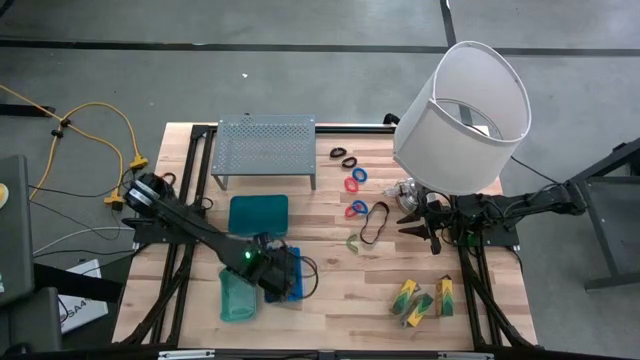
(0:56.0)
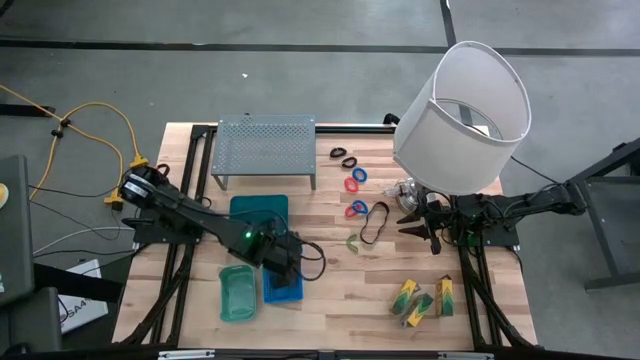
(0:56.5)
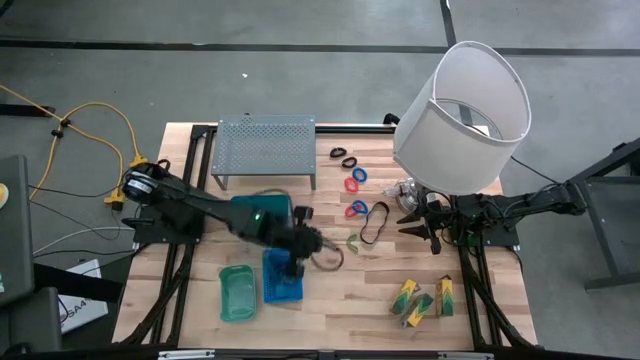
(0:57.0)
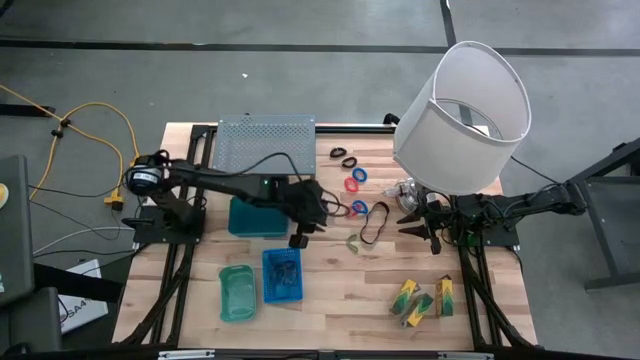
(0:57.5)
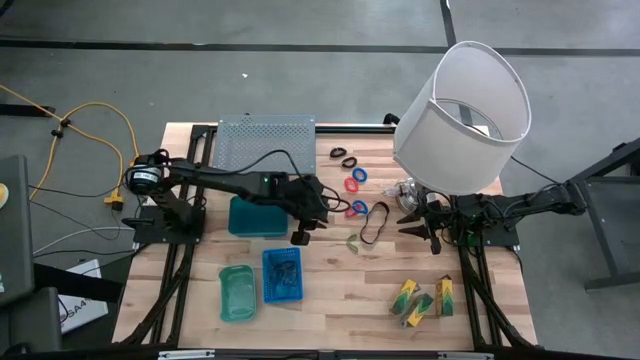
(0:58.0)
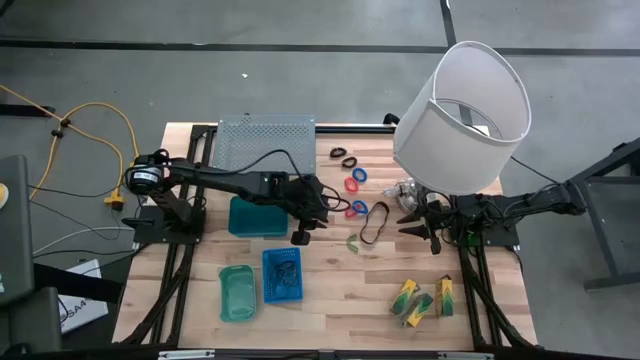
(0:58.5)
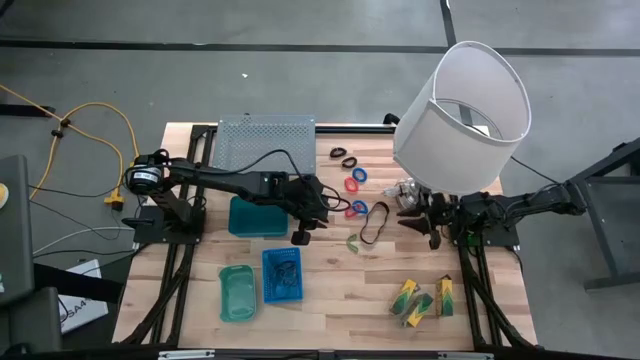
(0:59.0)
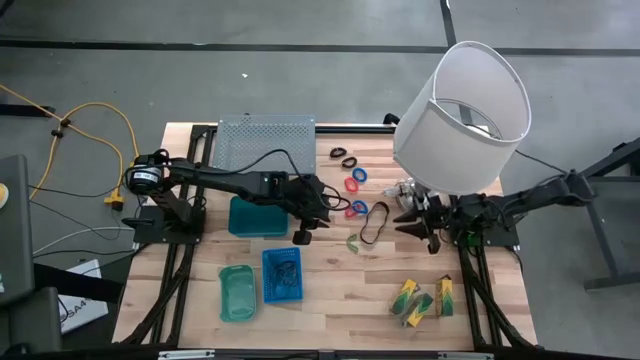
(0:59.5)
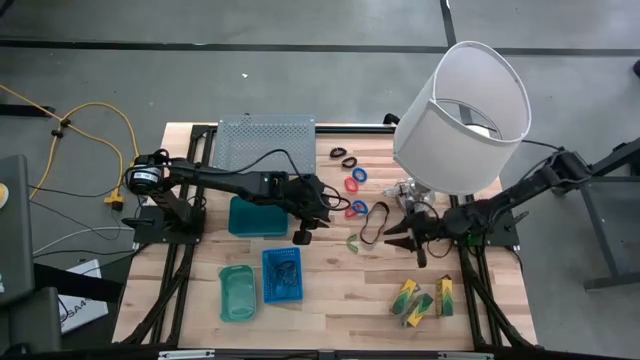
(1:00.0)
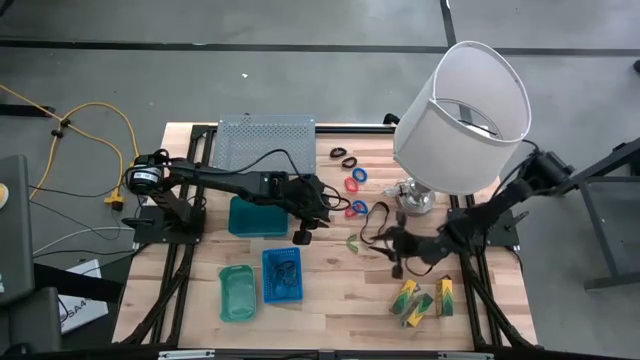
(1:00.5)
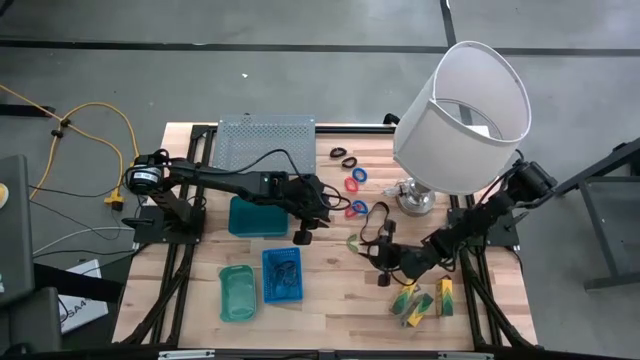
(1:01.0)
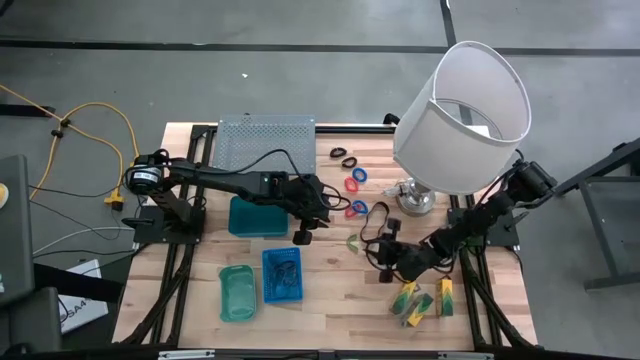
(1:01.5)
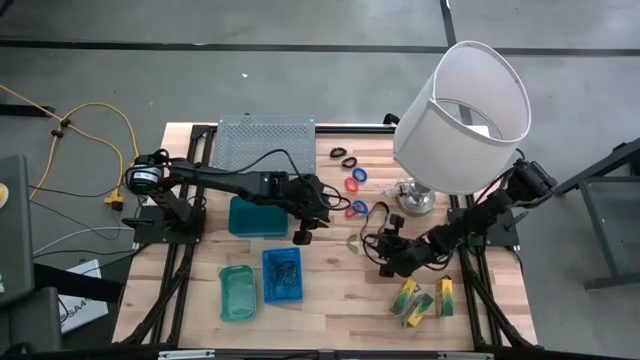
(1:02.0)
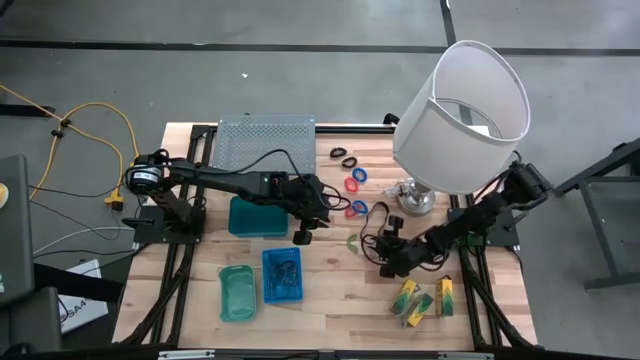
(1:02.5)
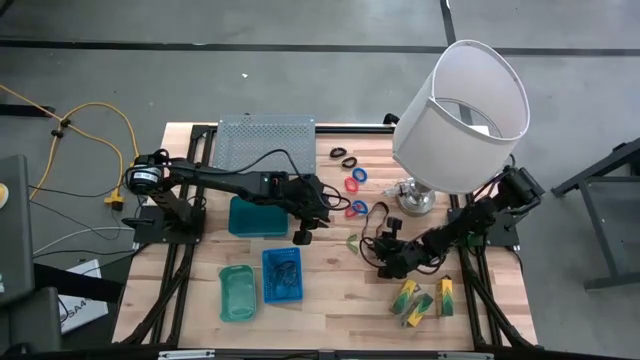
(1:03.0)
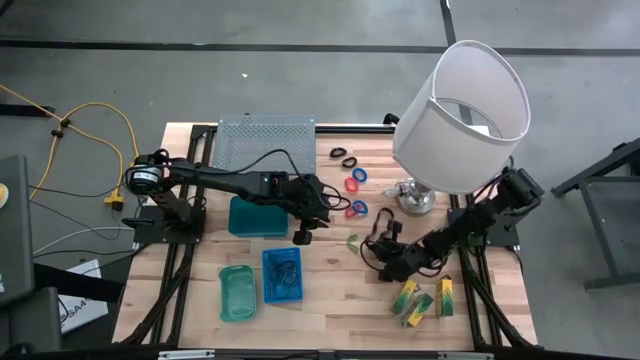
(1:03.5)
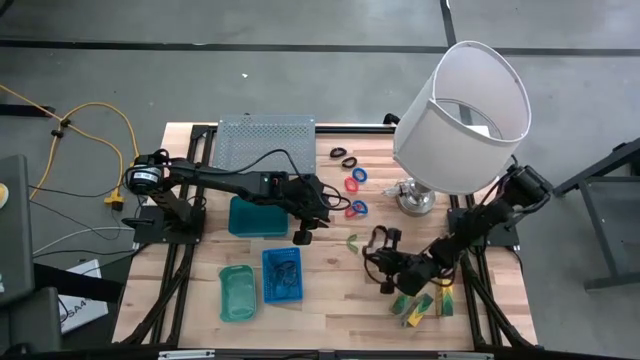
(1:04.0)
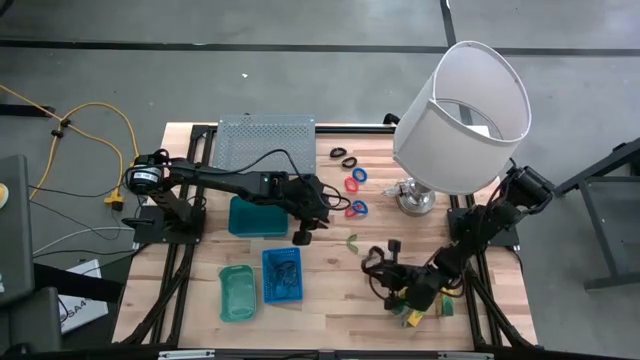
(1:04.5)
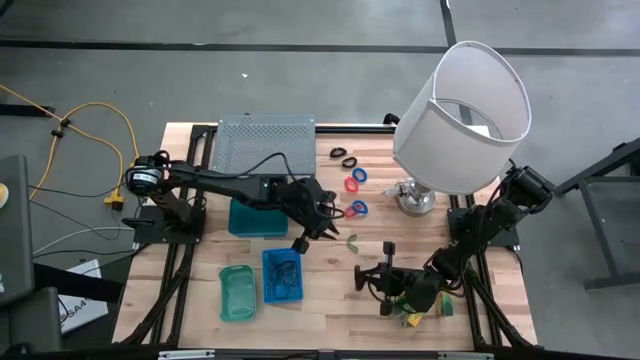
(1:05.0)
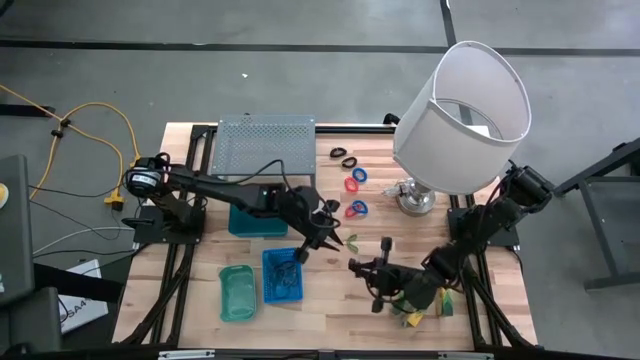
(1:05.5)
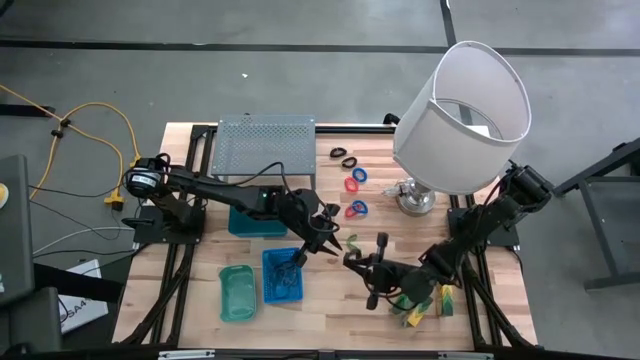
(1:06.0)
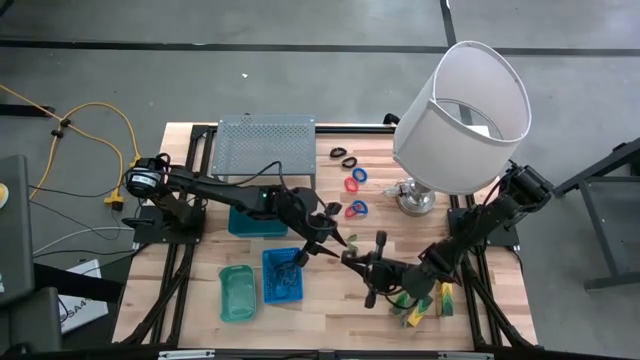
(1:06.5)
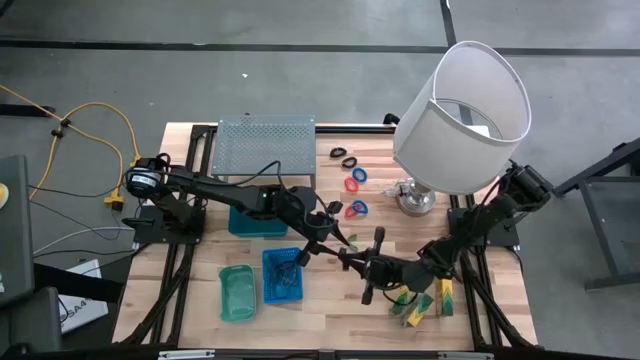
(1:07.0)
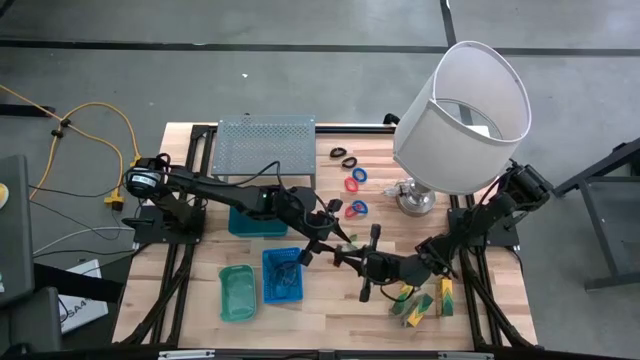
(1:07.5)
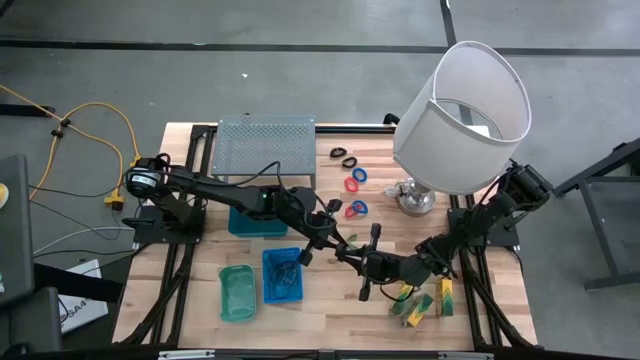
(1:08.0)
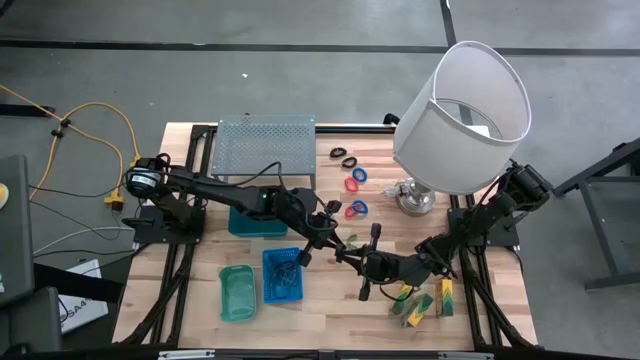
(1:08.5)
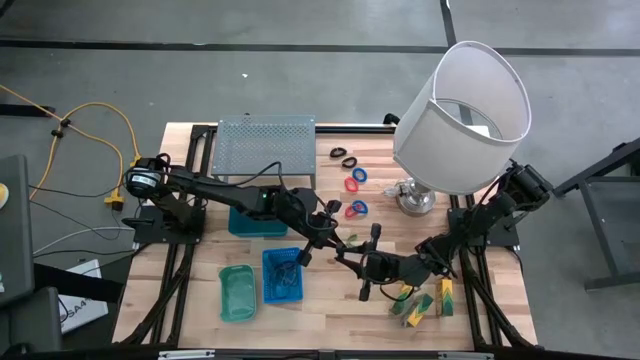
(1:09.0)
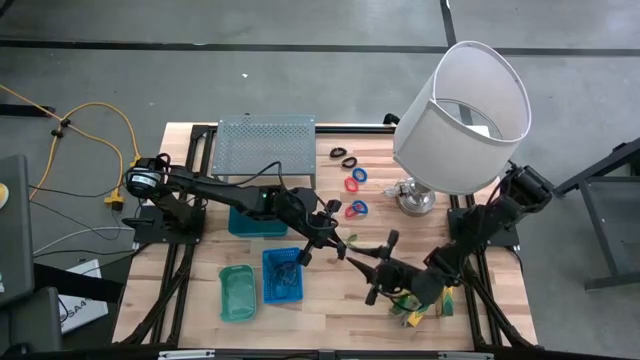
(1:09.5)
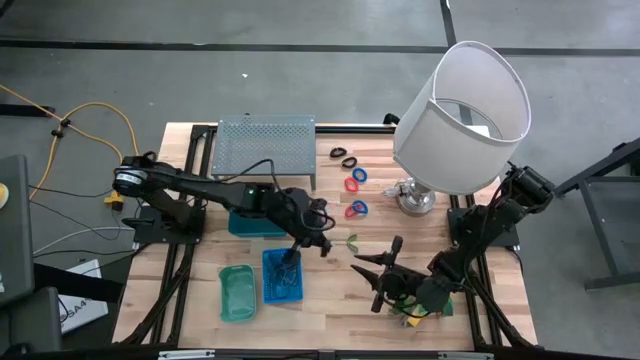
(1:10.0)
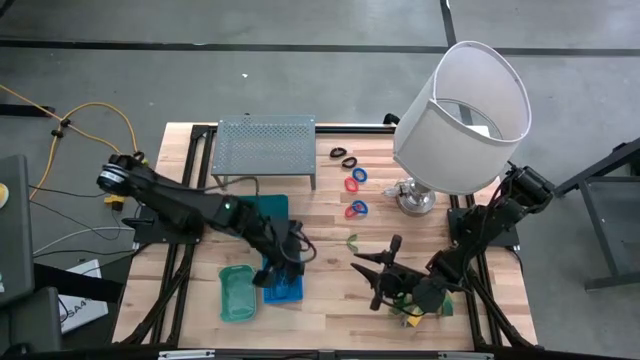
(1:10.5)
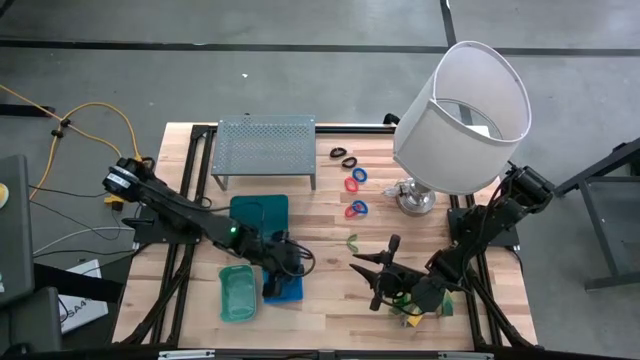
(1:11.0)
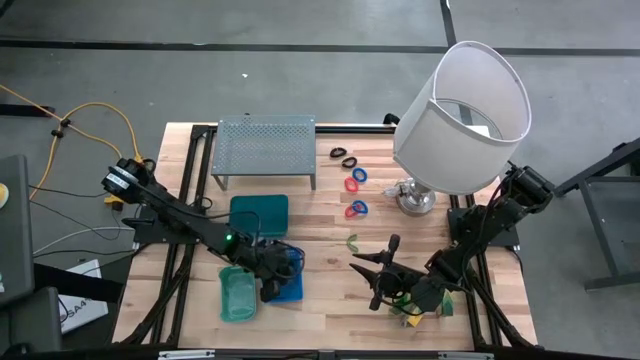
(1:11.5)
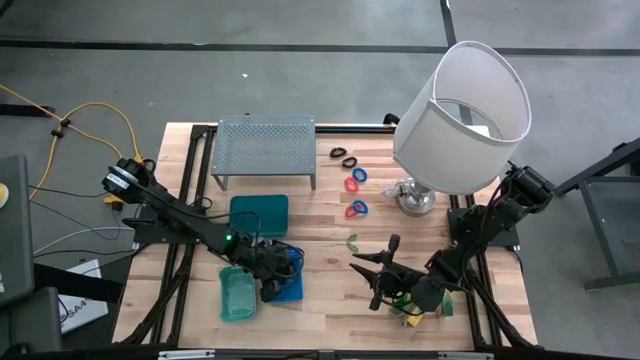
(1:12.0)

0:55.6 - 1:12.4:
Task: Pick & Place Office Desk Supplies
Put the black rubber band into the bottom blue bin

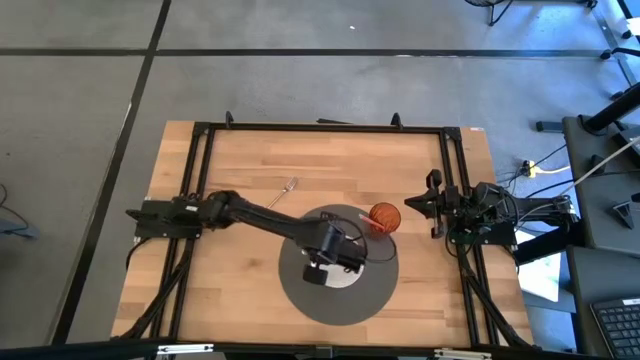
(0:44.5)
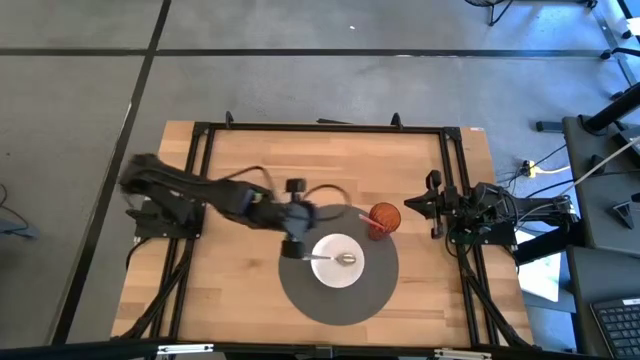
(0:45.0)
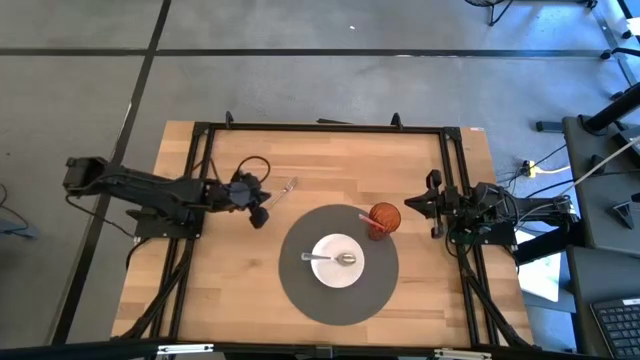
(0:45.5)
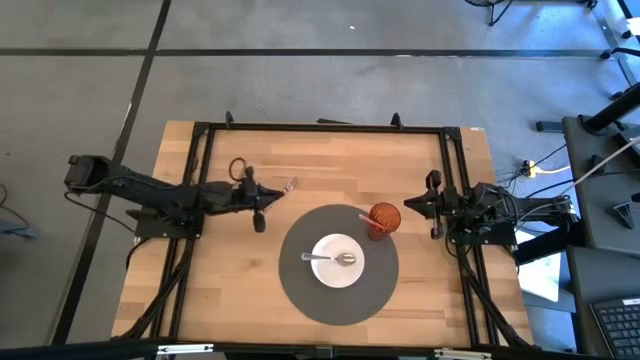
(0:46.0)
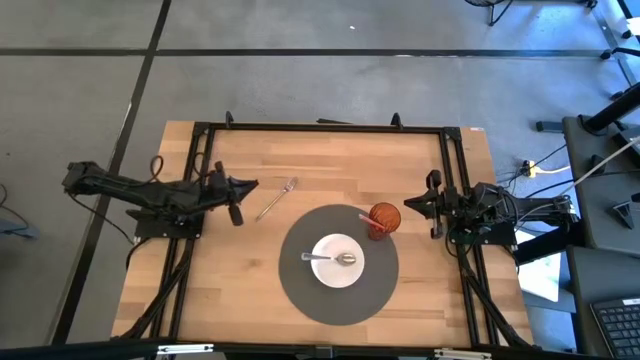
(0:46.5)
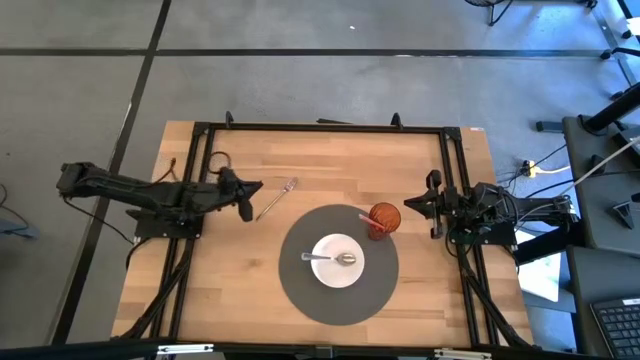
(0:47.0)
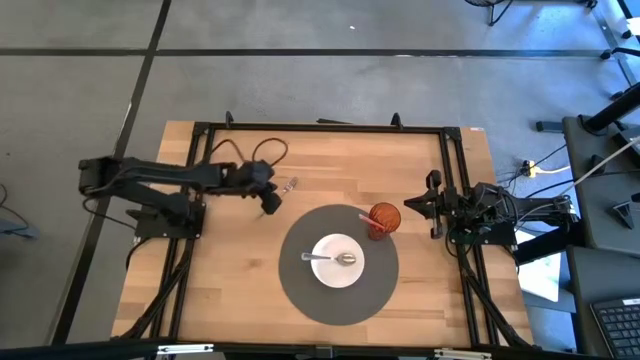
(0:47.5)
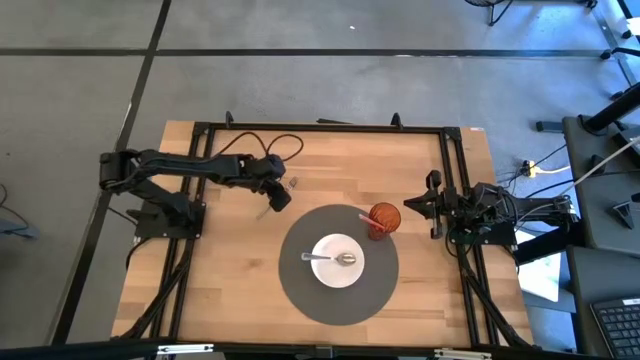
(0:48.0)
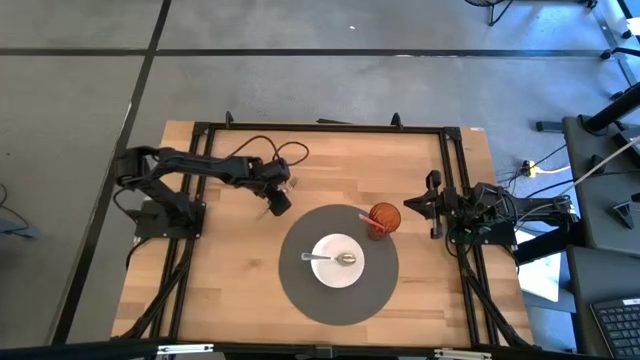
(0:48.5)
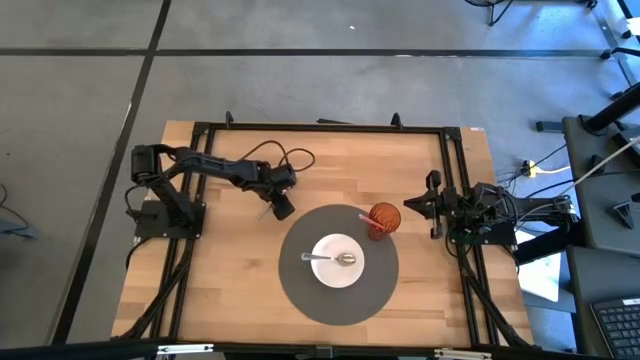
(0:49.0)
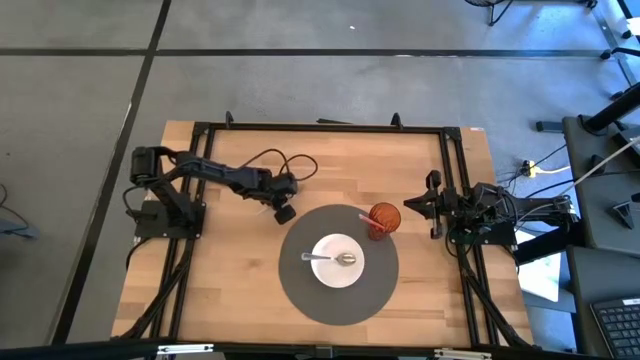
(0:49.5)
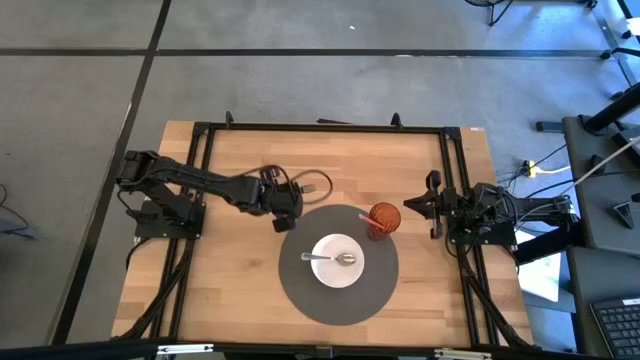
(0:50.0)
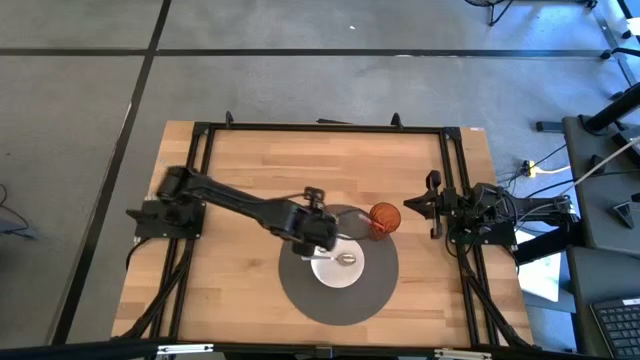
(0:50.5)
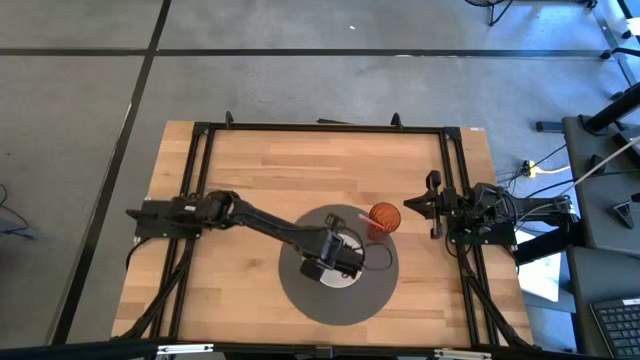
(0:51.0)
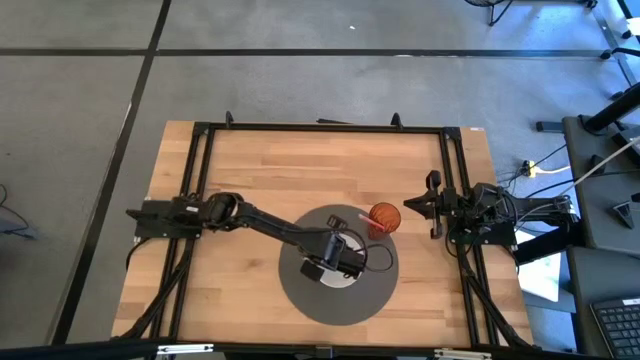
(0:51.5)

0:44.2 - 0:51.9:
Task: Pick & Place Utensil
Put the silver fork into the white bowl on the gray placemat
